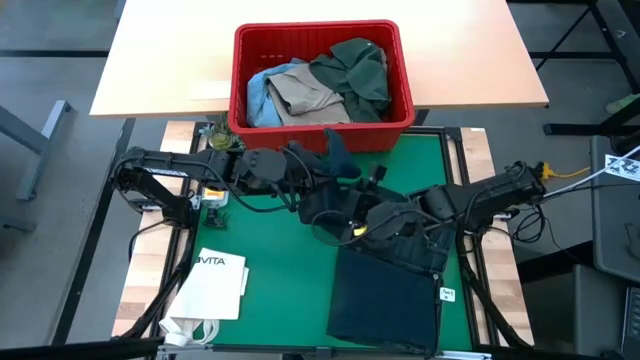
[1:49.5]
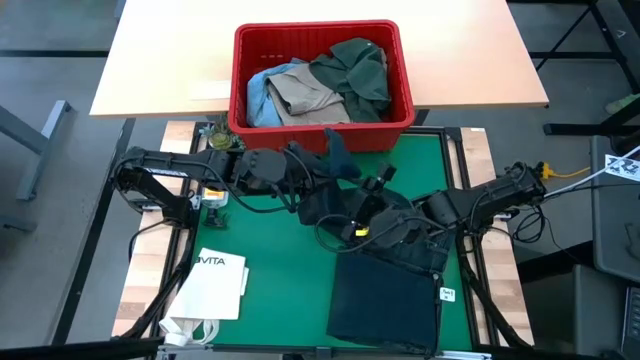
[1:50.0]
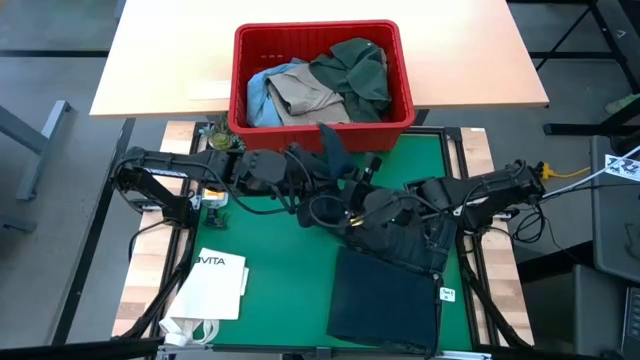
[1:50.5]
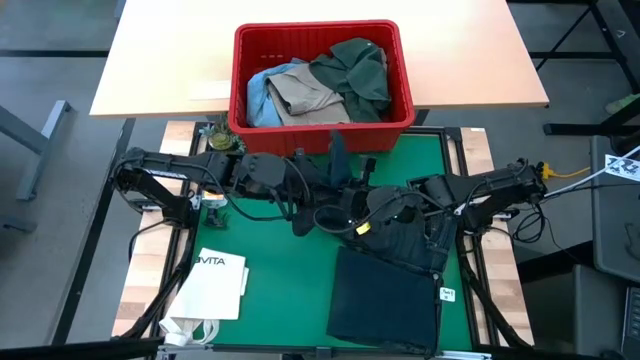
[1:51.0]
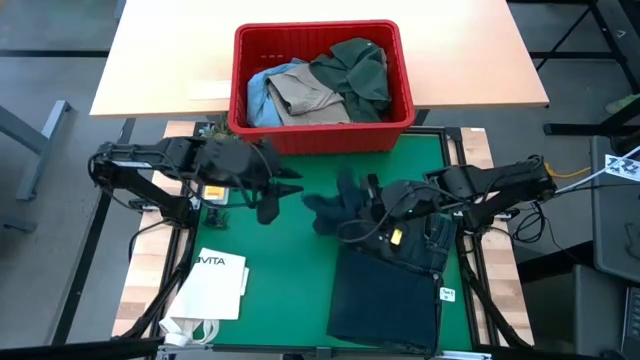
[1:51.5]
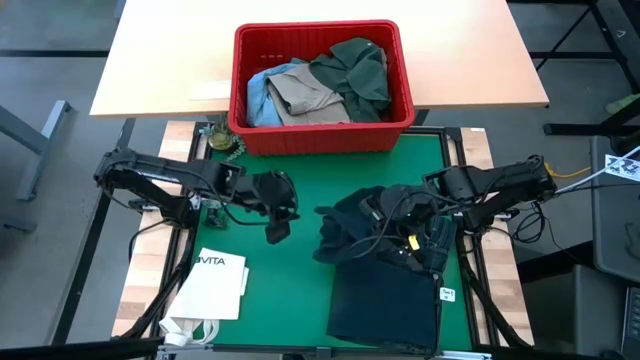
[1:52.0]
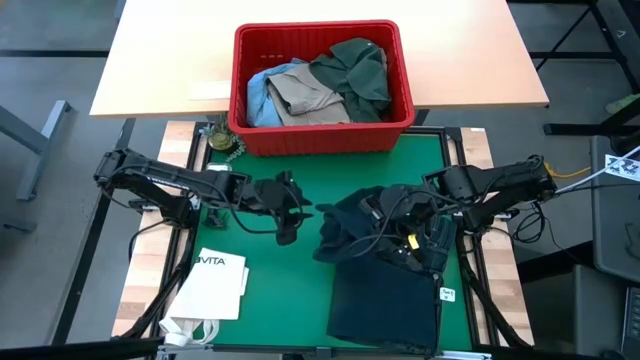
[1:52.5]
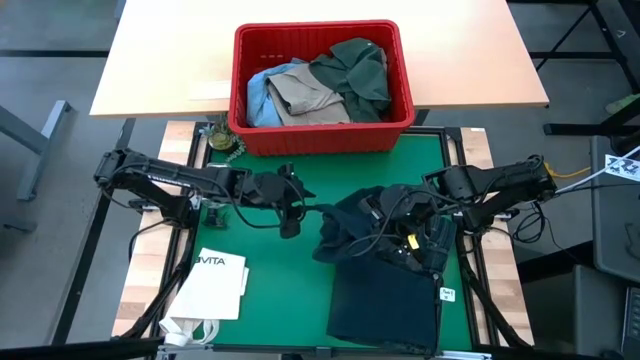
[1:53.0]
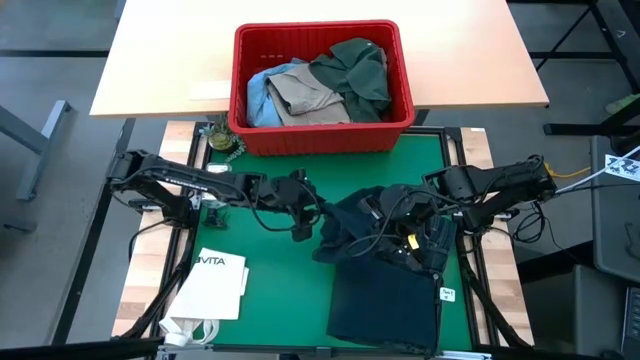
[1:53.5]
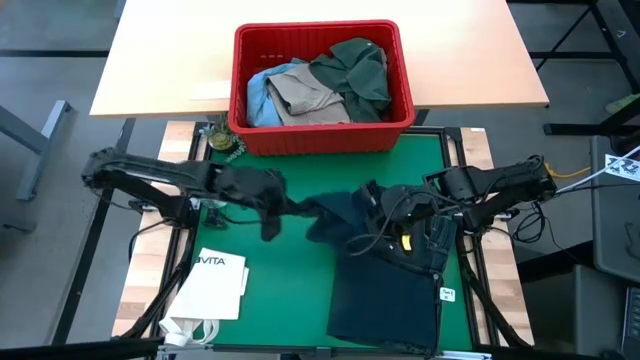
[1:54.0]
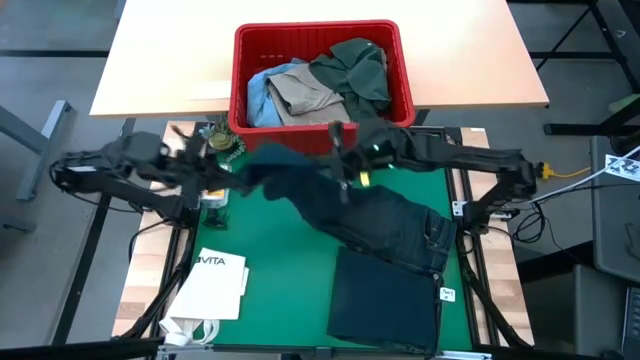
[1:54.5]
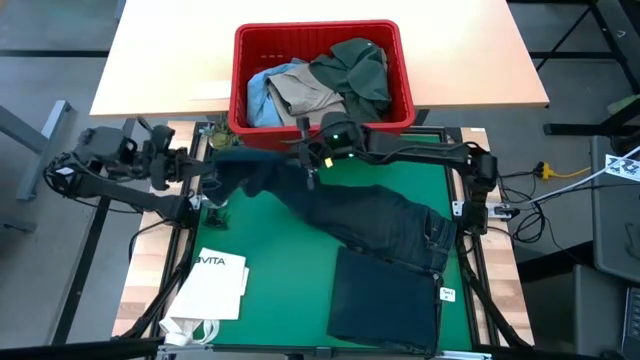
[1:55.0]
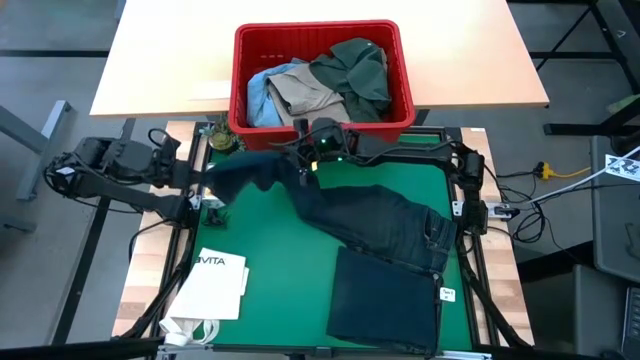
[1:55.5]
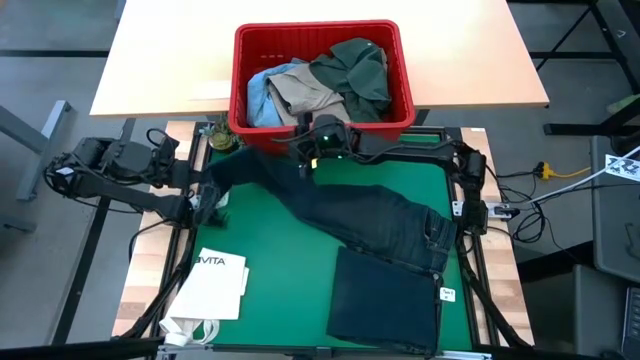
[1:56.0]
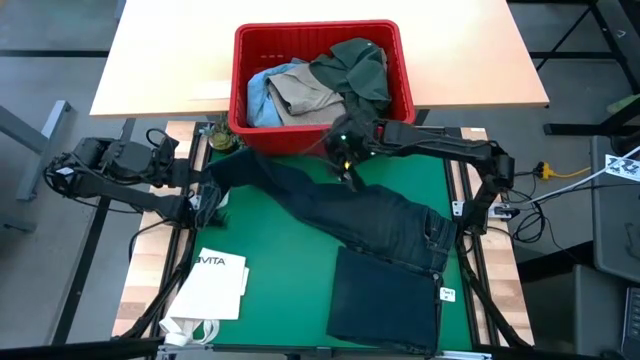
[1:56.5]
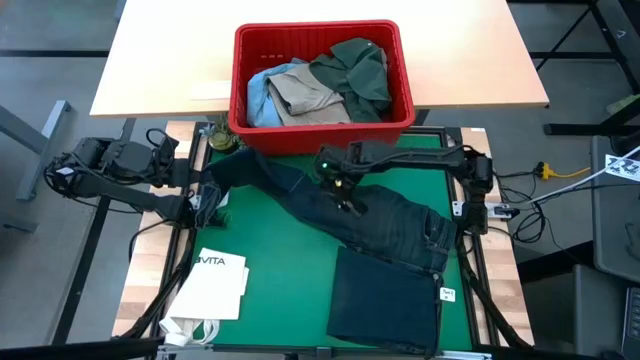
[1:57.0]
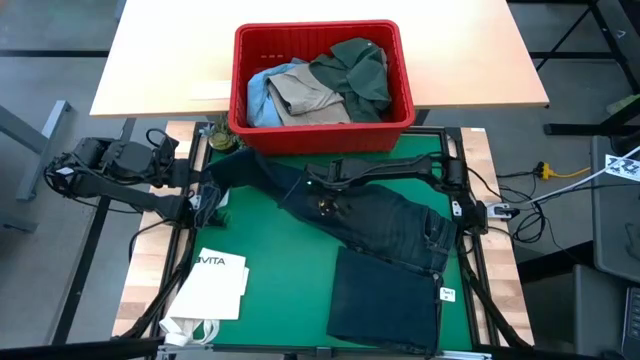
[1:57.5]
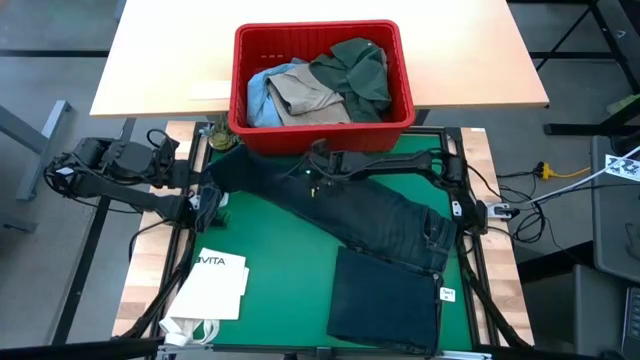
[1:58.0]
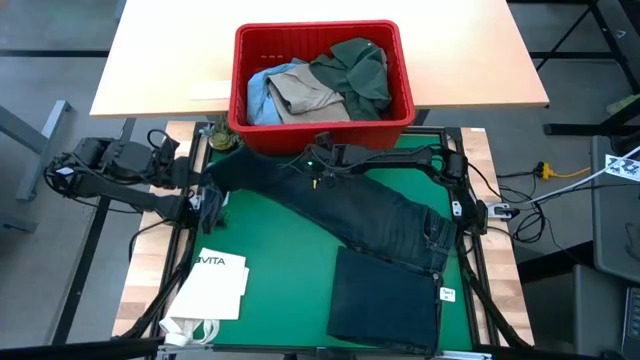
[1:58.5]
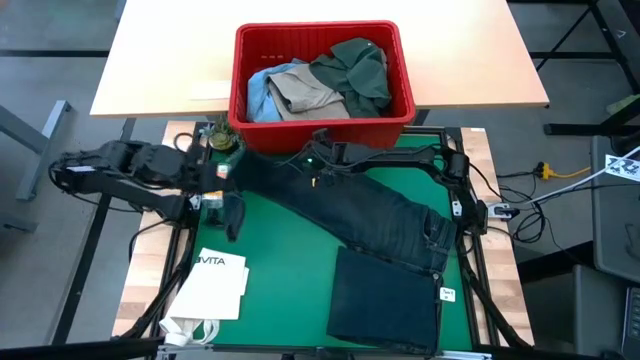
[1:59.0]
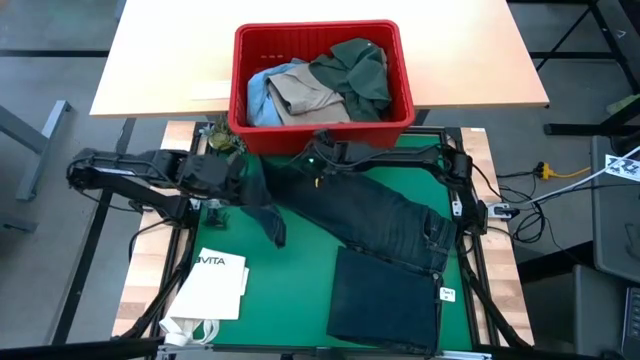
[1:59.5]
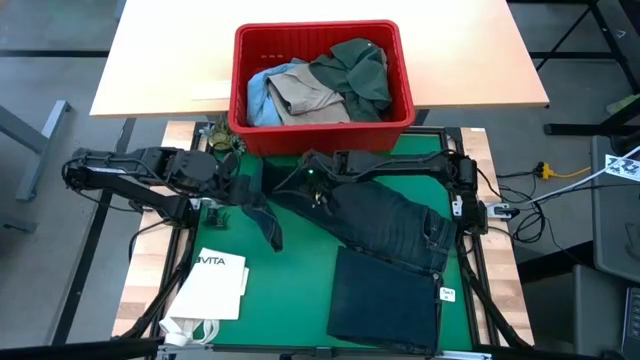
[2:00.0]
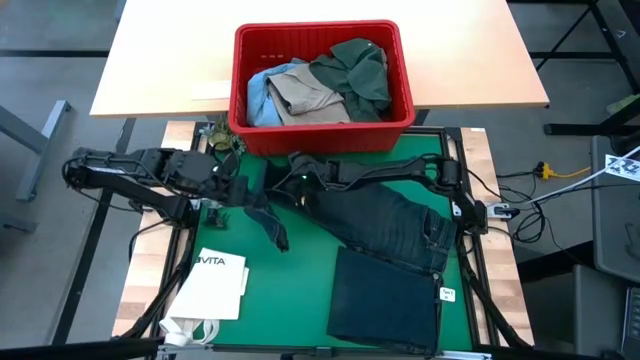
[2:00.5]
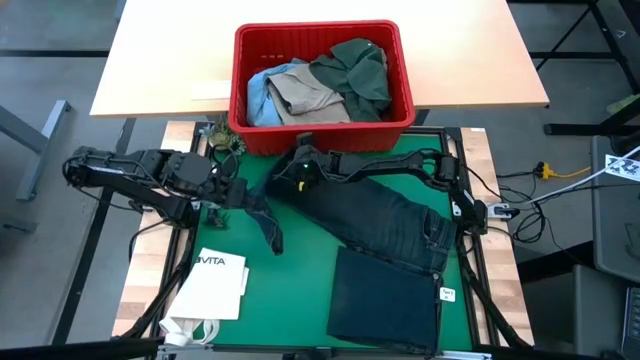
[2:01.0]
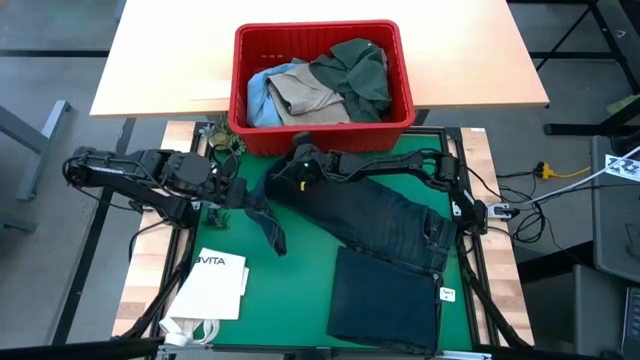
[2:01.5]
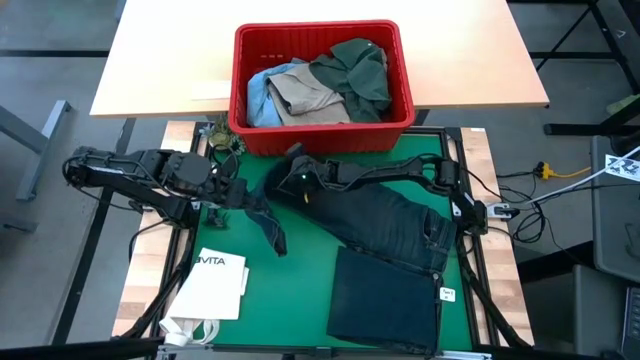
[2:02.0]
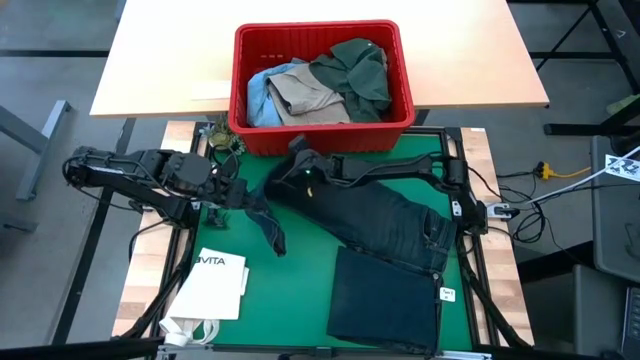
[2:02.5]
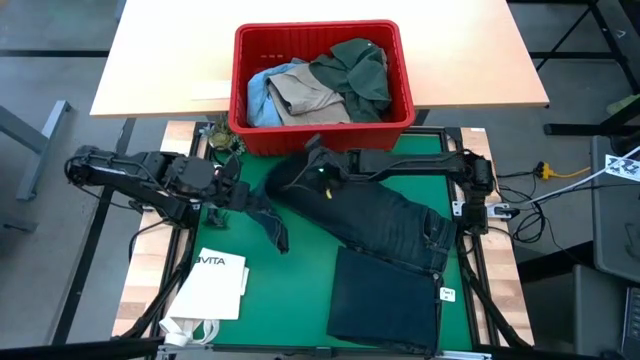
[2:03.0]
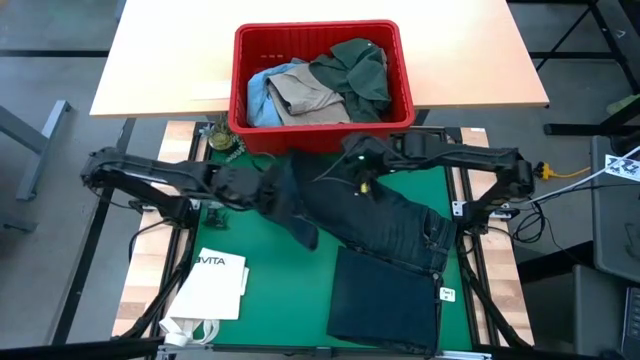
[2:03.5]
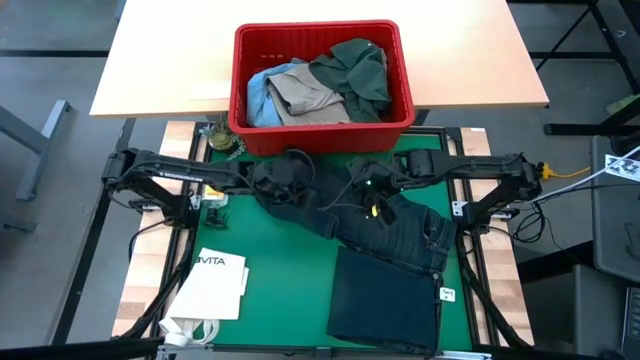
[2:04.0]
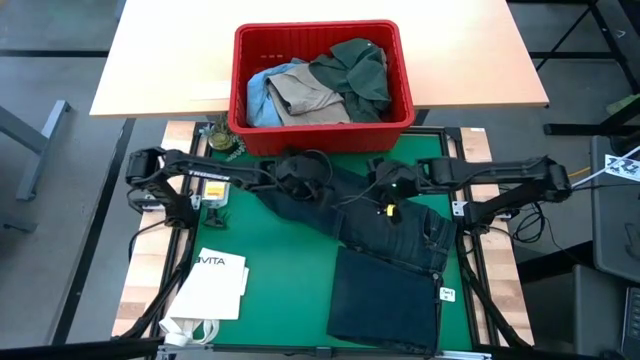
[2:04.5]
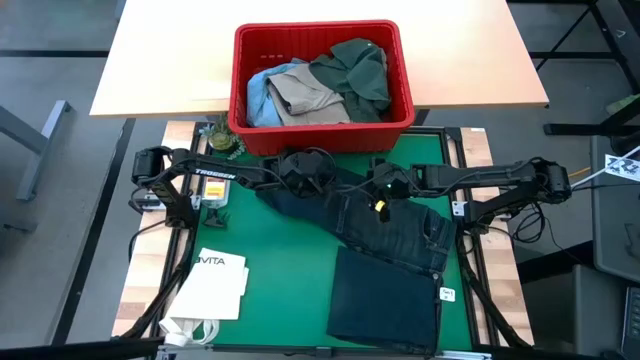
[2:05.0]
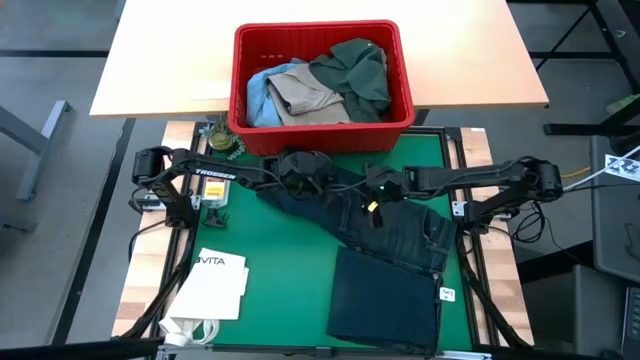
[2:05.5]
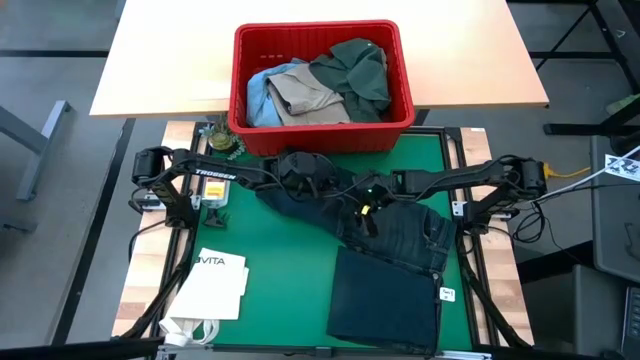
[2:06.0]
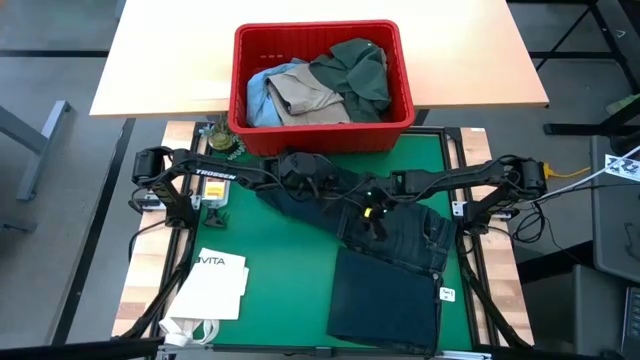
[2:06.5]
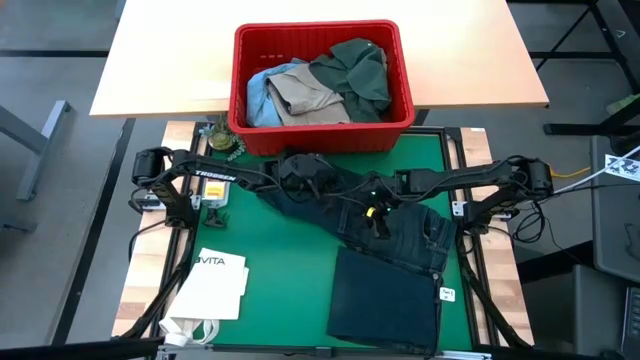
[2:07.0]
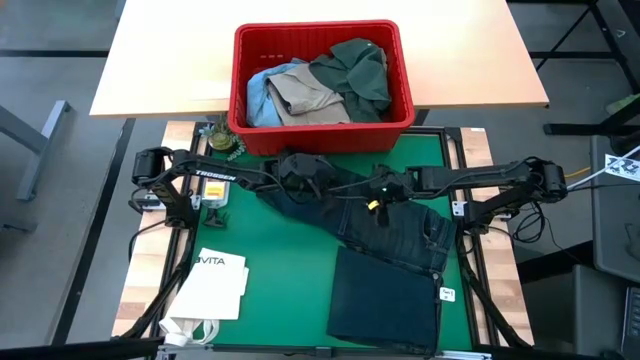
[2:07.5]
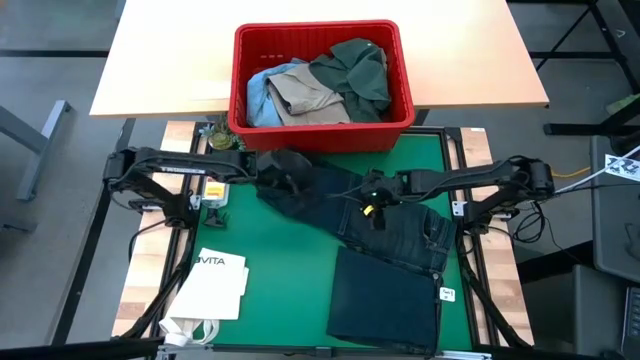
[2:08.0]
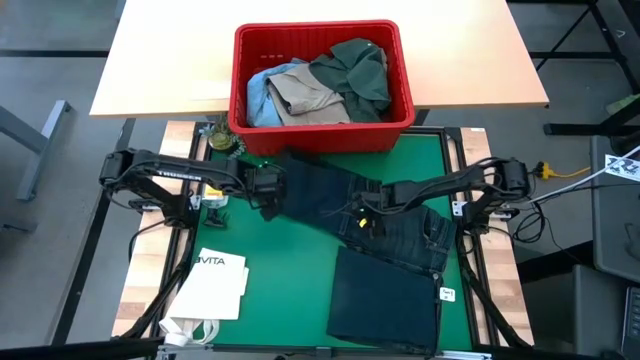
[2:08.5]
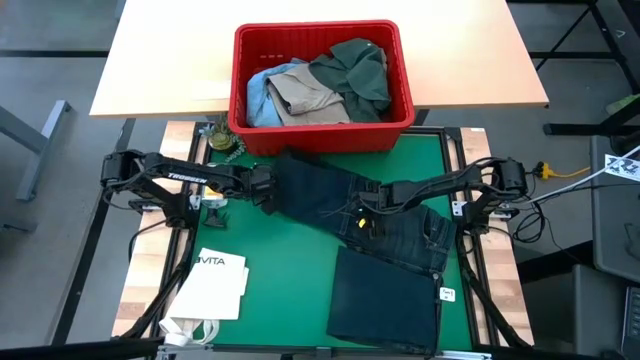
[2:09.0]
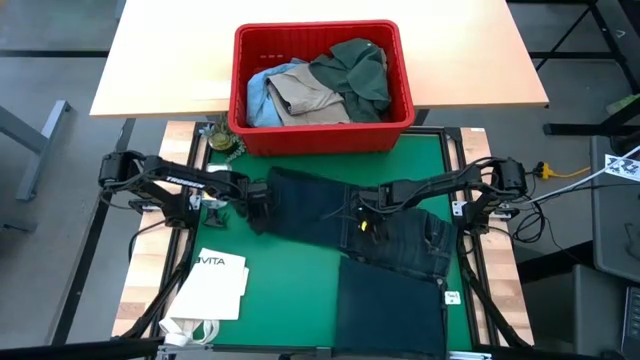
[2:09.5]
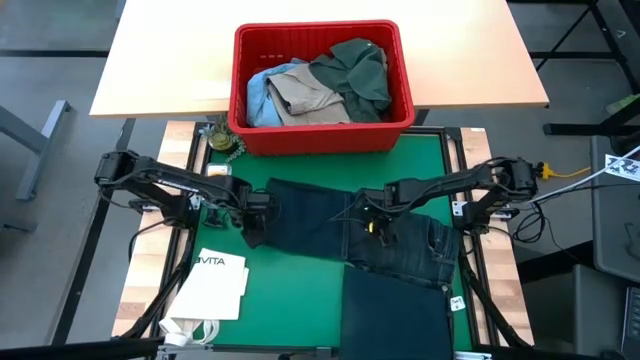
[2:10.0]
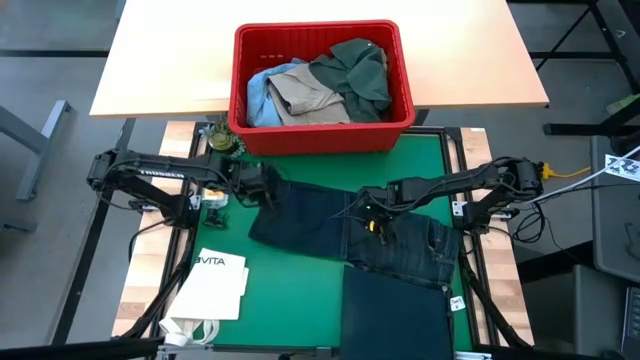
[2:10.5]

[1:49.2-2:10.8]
Task: Fold Laundry from Bin
Fold the dark blue pants
